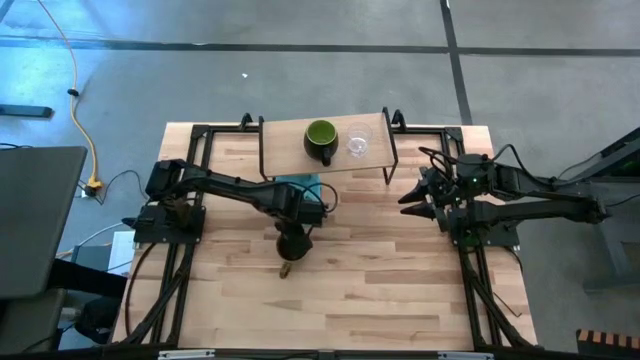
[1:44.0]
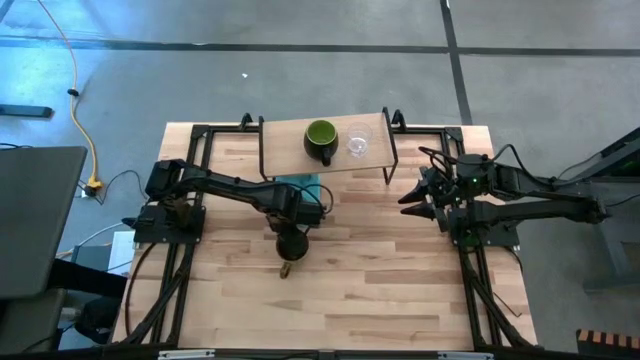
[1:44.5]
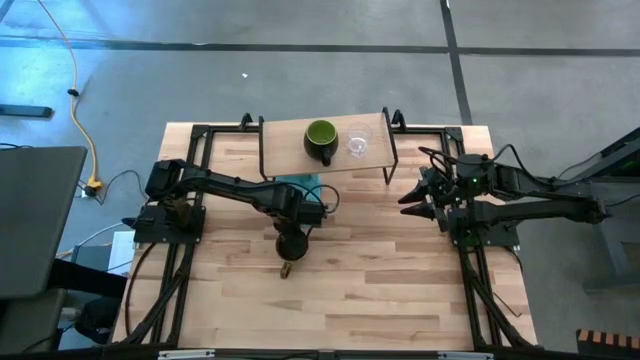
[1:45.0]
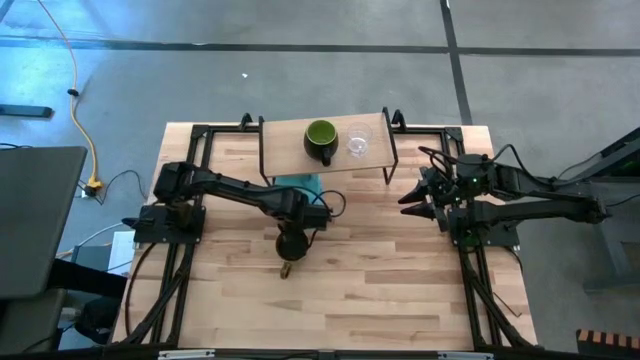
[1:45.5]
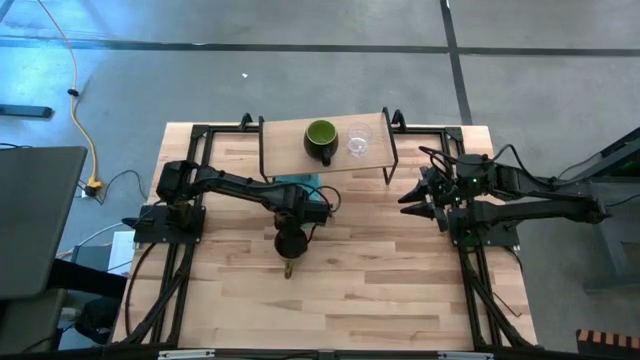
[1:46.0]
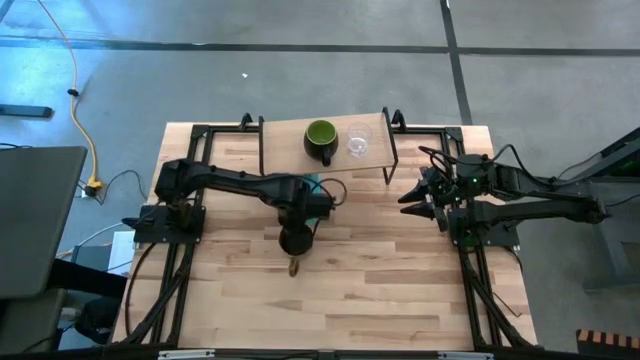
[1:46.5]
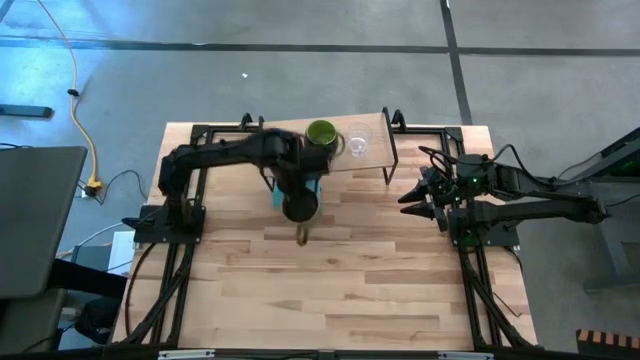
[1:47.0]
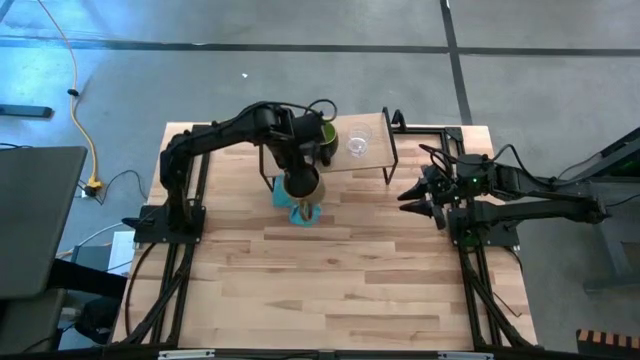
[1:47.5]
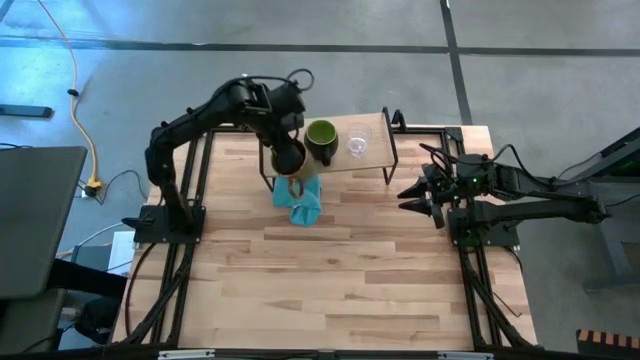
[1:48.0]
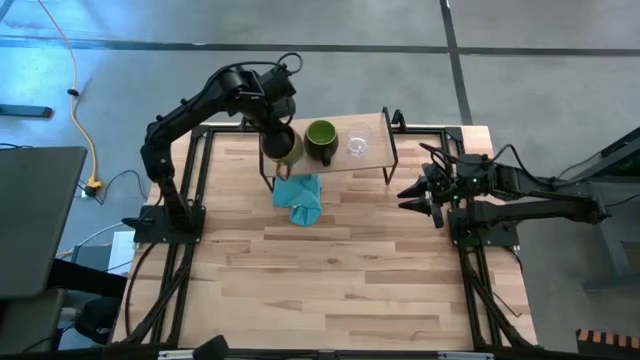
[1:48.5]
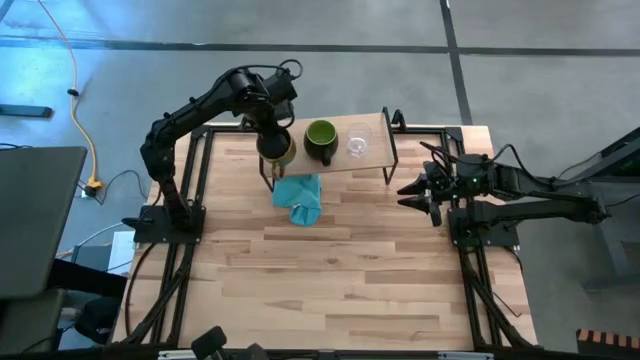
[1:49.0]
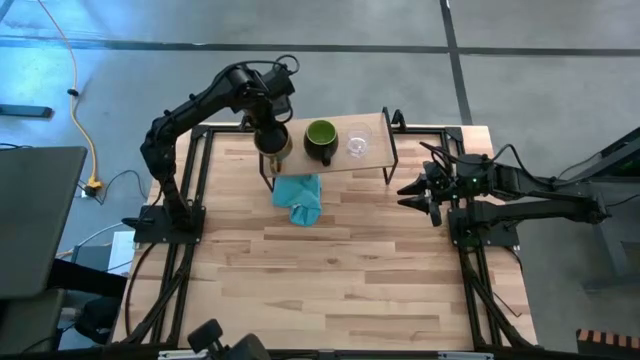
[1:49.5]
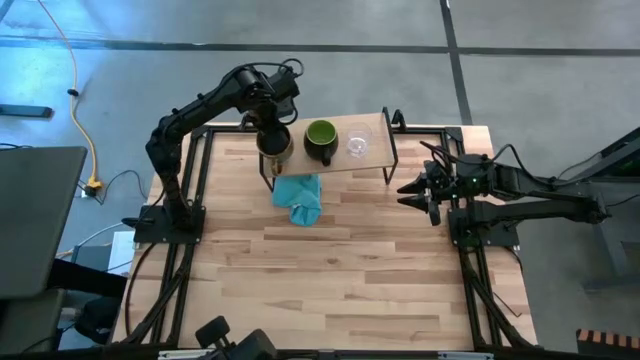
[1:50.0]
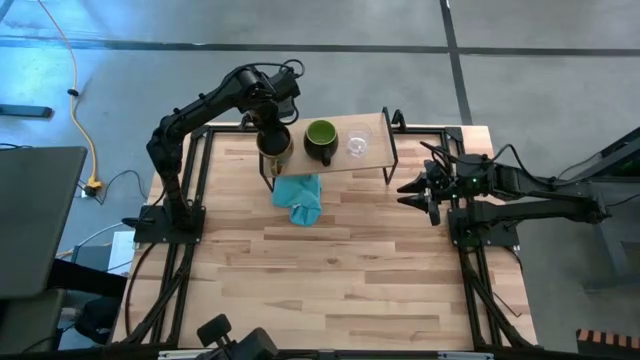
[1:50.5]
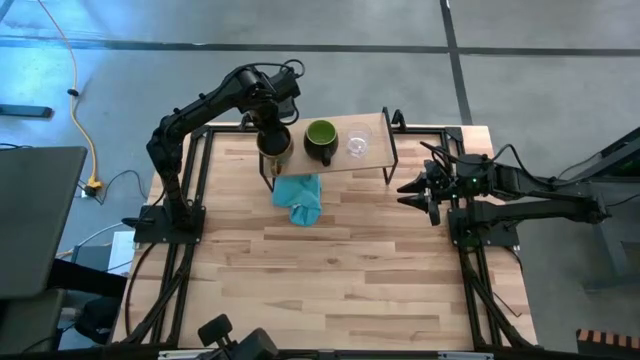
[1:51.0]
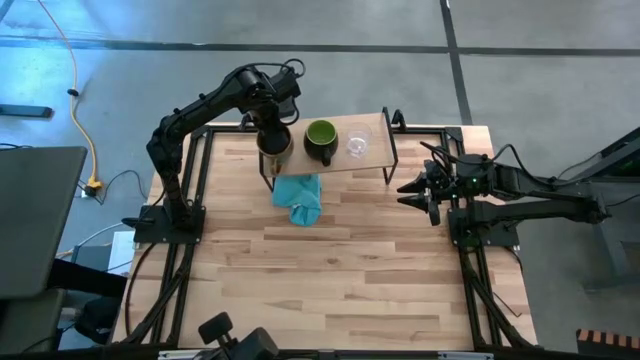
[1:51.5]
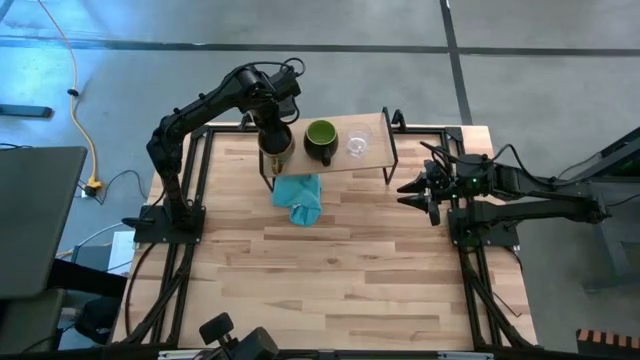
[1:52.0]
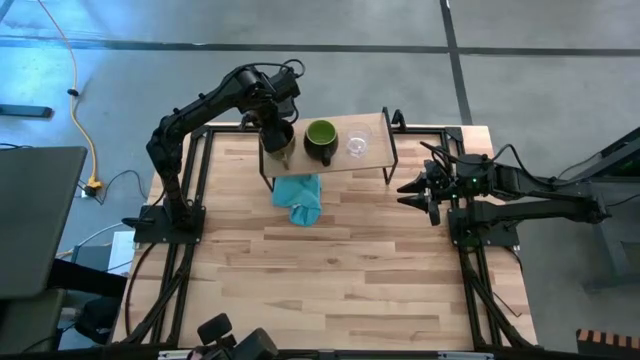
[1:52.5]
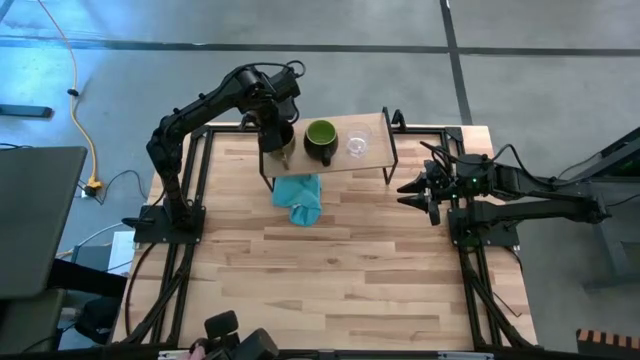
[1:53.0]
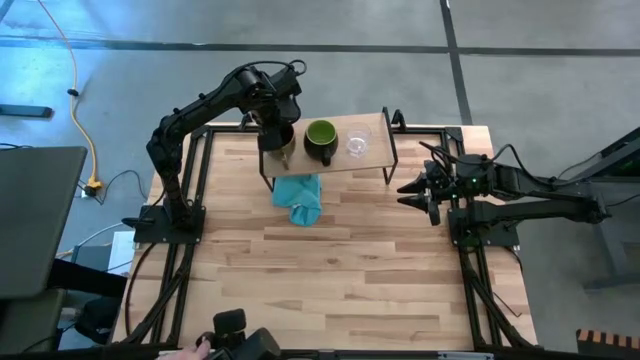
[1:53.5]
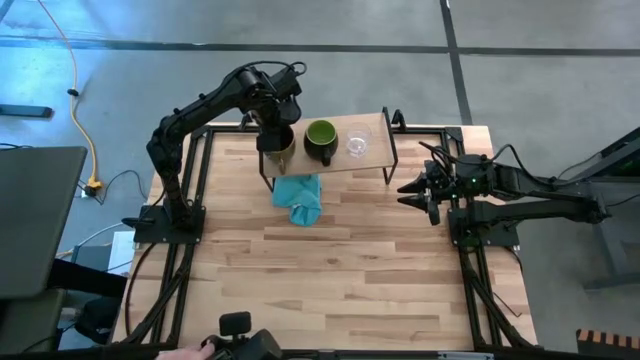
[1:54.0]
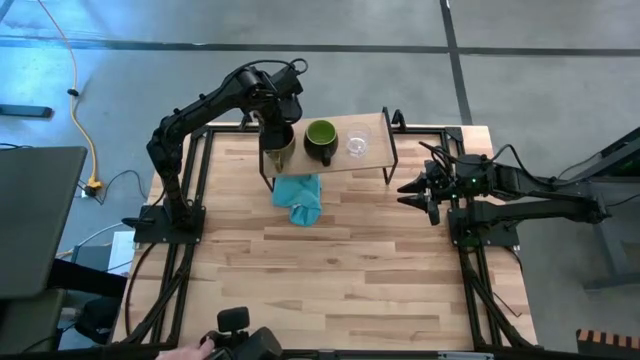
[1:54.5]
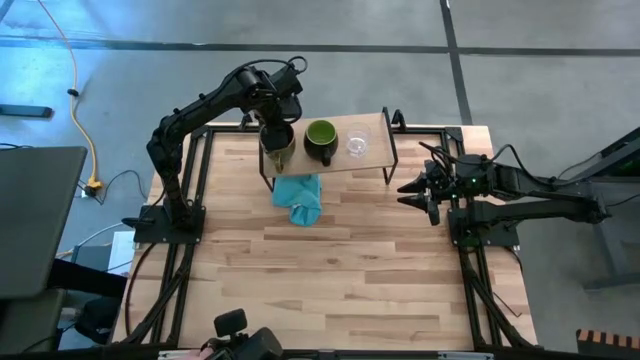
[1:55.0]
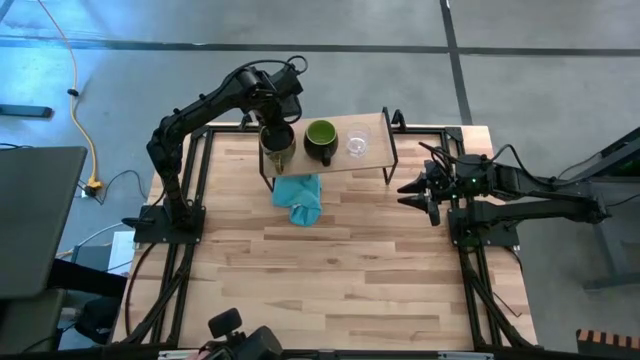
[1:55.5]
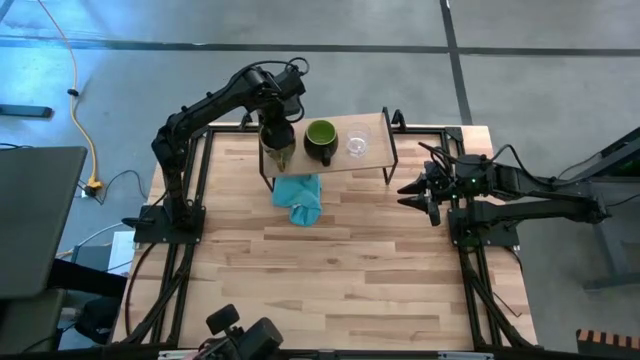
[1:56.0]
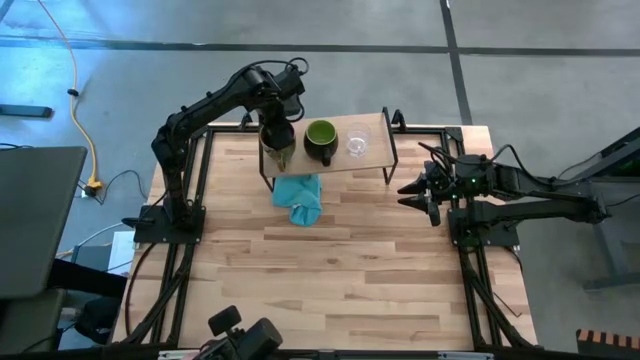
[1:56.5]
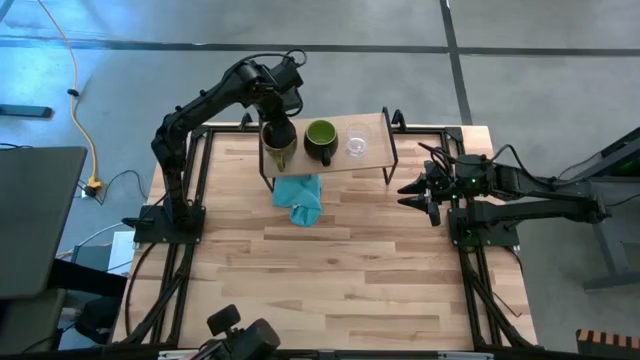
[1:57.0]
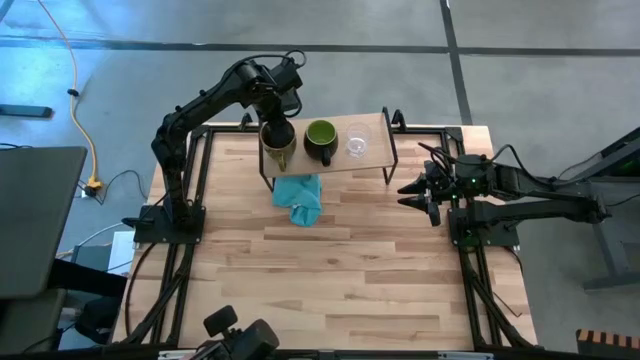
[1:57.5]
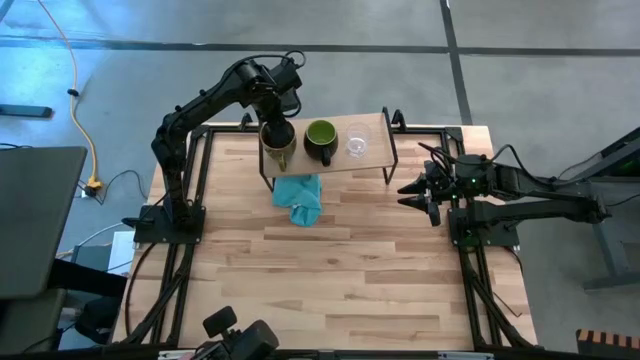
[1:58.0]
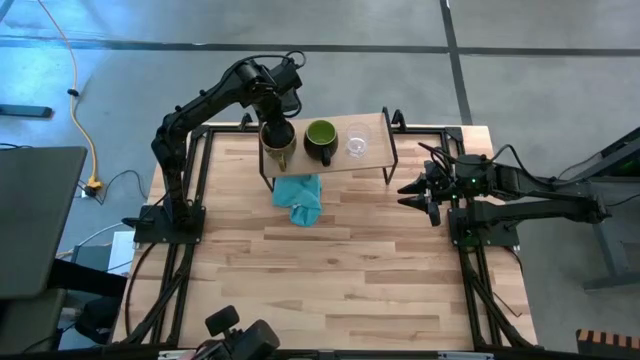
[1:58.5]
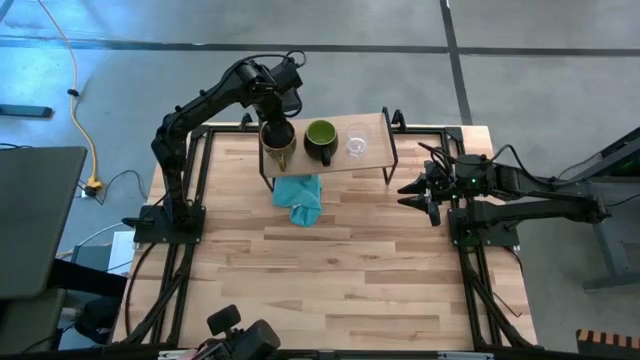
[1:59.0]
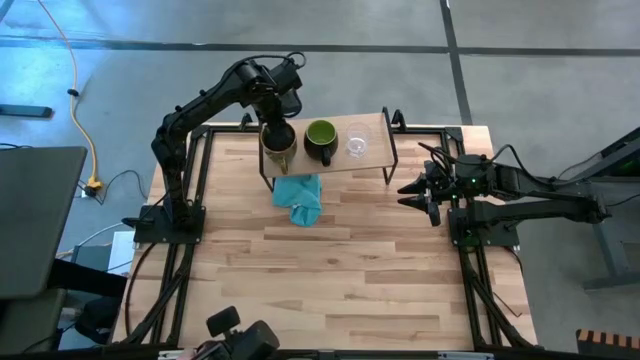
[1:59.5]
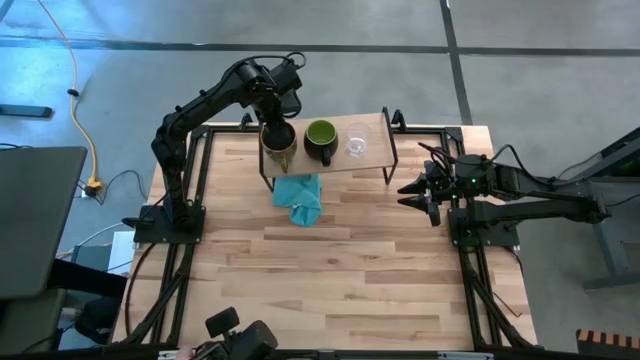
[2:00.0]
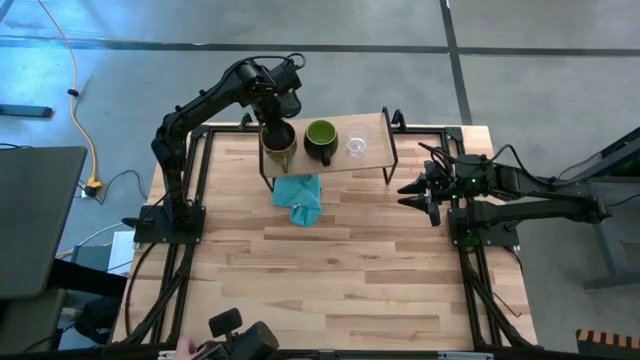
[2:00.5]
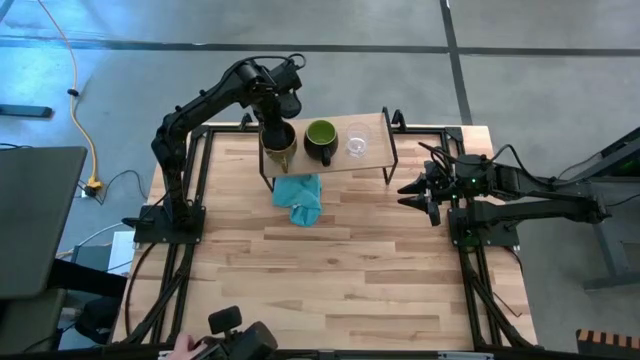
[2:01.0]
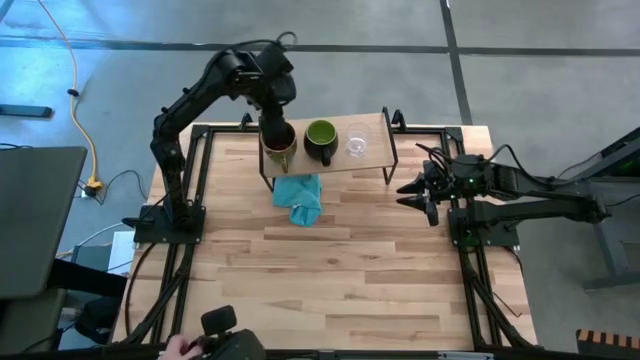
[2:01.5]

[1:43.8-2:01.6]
Task: Stack small to large cups/mugs on shelf
Put the green mug on the shelf

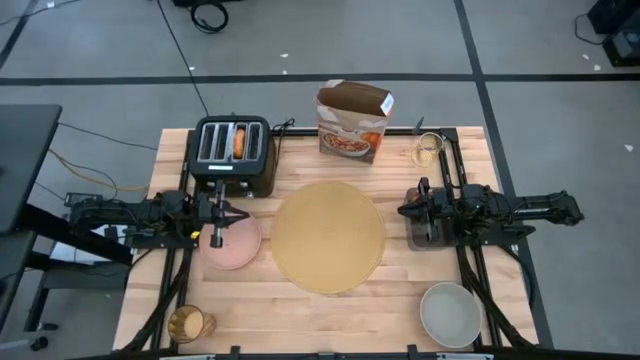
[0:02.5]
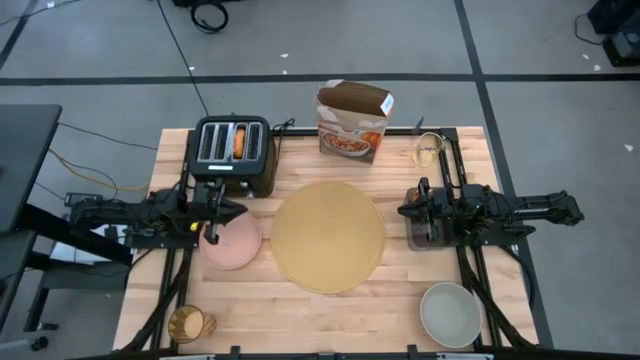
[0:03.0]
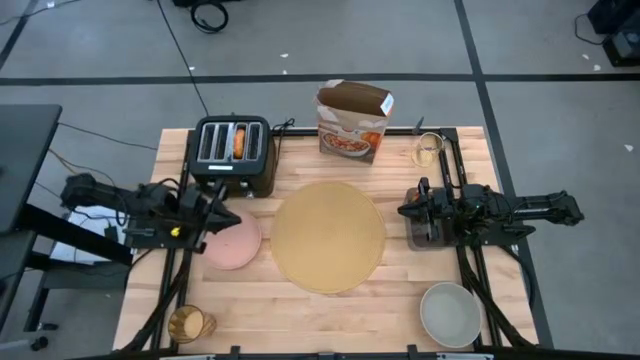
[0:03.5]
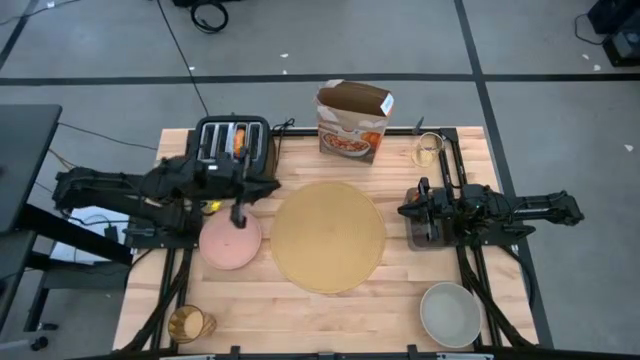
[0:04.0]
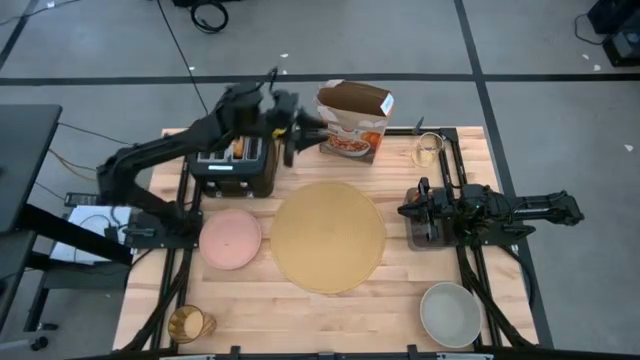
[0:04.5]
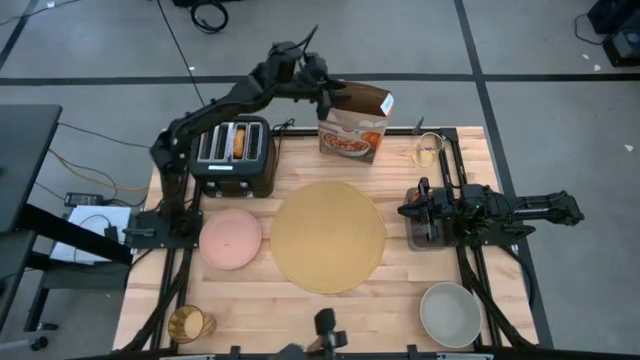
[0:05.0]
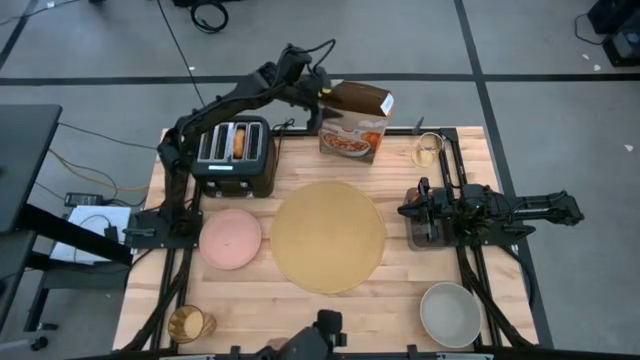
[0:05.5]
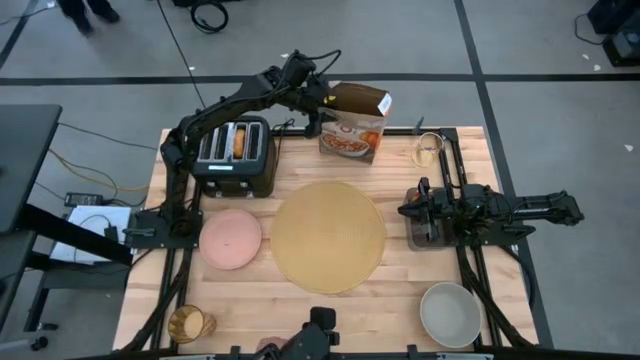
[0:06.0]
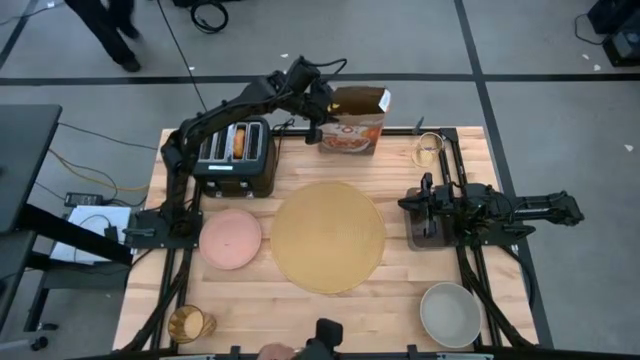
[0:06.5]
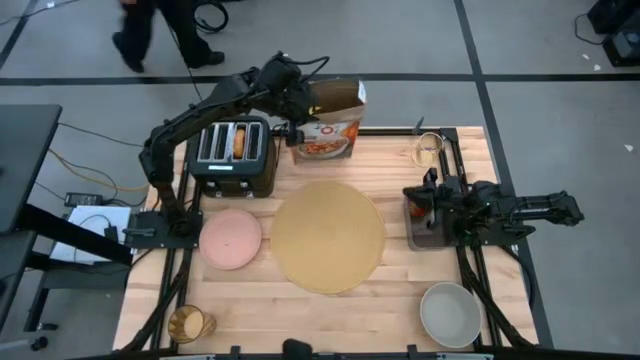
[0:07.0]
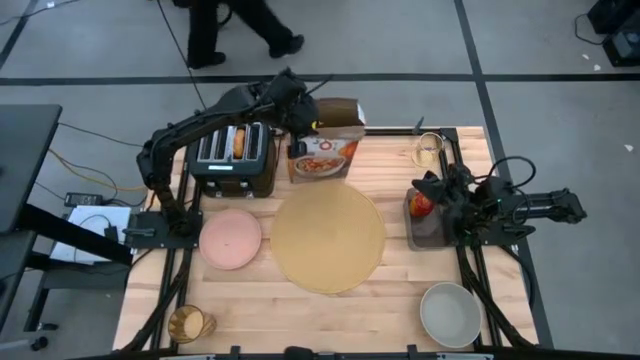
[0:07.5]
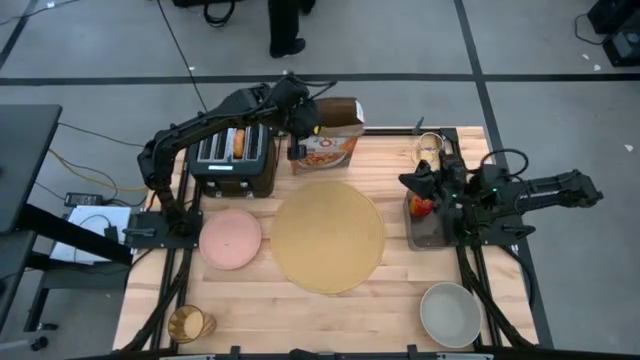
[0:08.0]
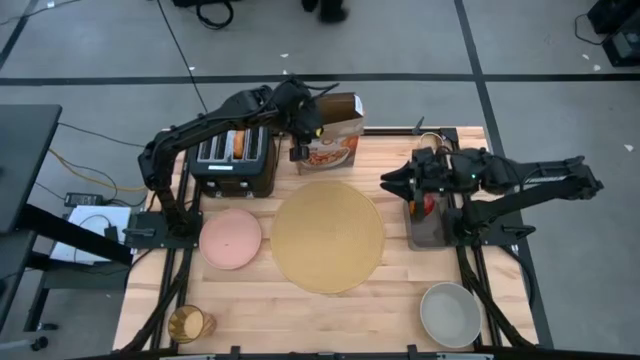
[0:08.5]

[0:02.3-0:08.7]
Task: Arrange a breakfast setting
Adjust the cereal box
